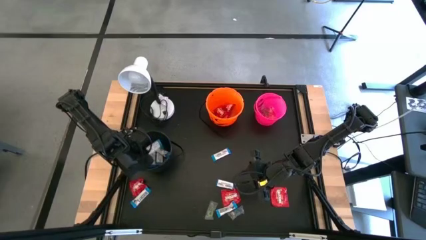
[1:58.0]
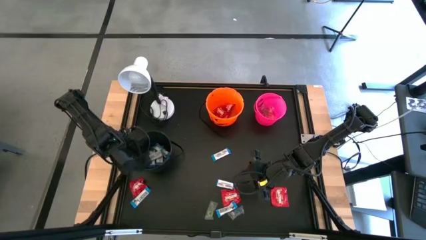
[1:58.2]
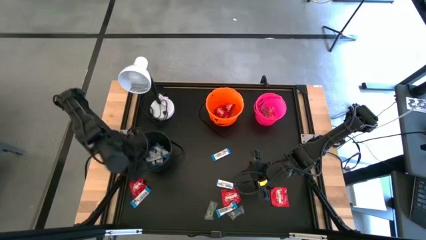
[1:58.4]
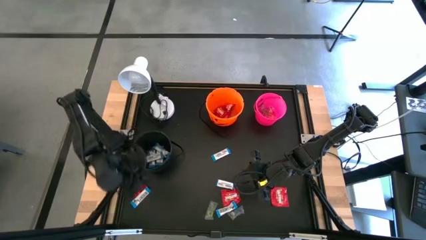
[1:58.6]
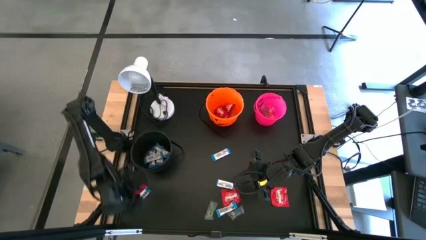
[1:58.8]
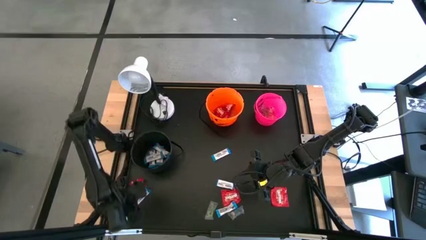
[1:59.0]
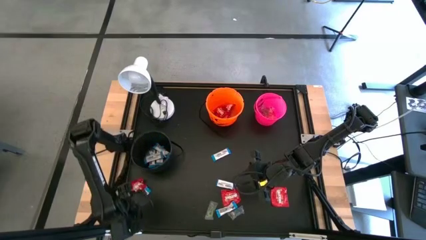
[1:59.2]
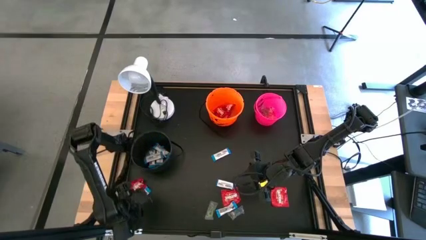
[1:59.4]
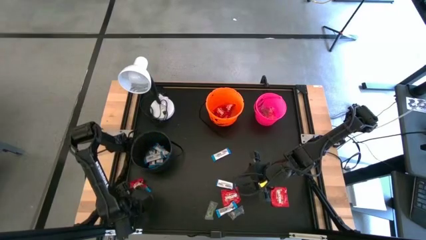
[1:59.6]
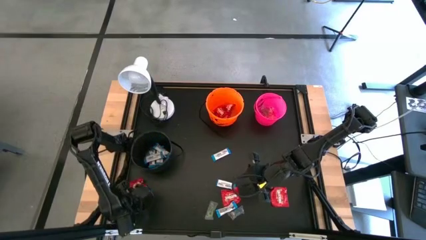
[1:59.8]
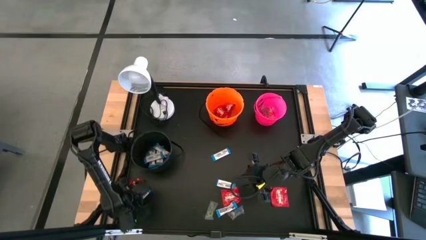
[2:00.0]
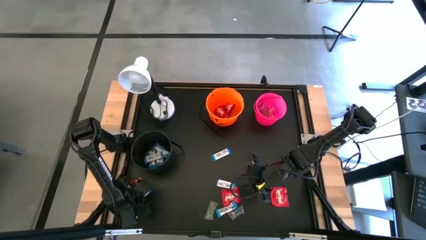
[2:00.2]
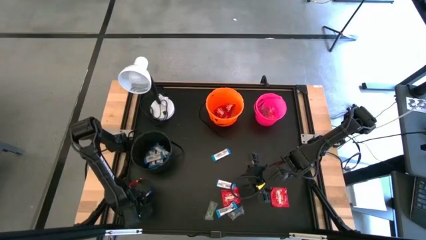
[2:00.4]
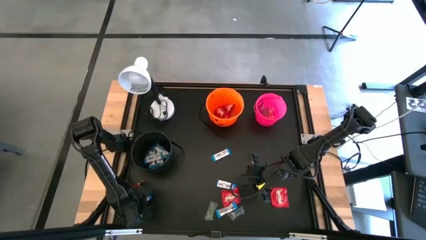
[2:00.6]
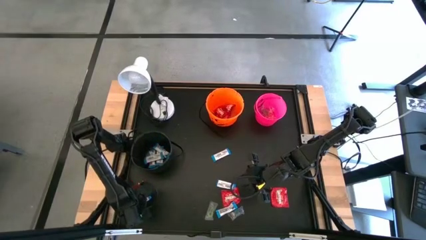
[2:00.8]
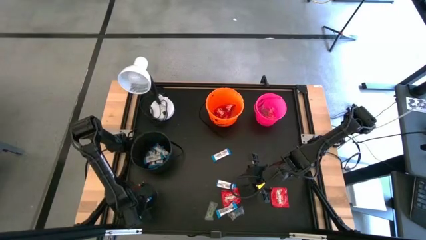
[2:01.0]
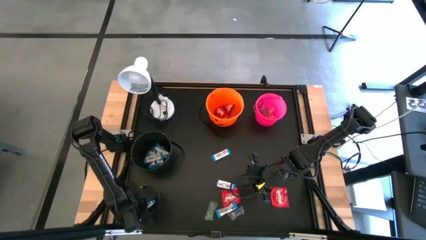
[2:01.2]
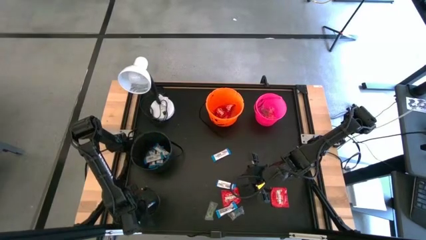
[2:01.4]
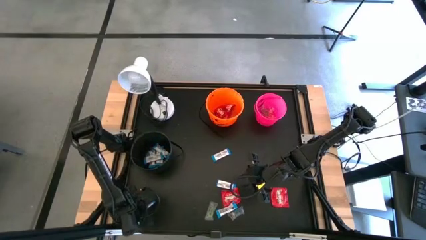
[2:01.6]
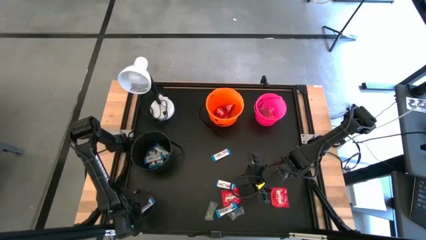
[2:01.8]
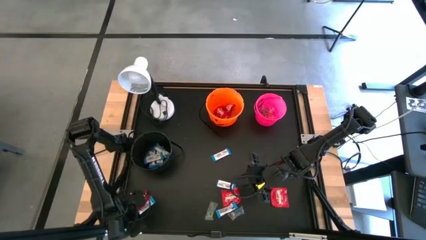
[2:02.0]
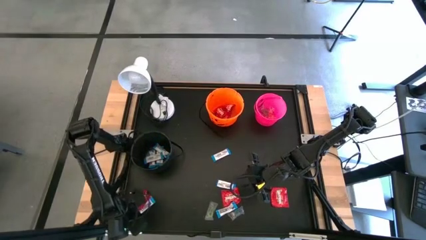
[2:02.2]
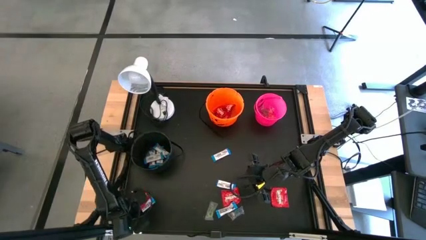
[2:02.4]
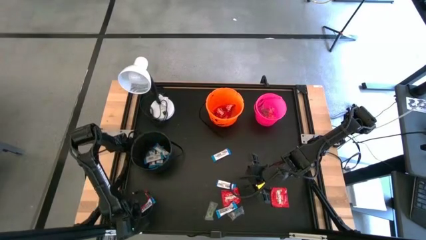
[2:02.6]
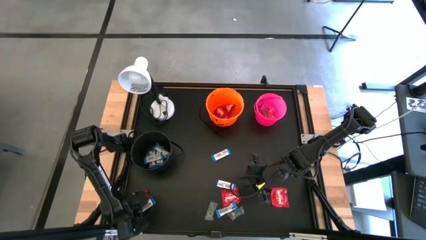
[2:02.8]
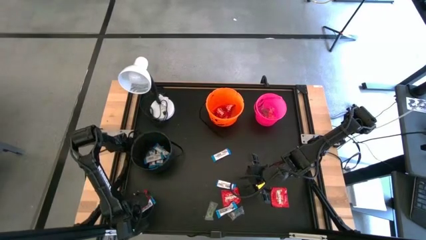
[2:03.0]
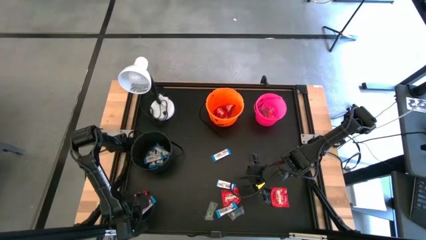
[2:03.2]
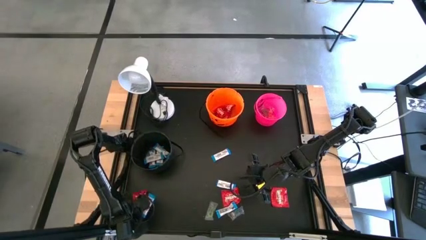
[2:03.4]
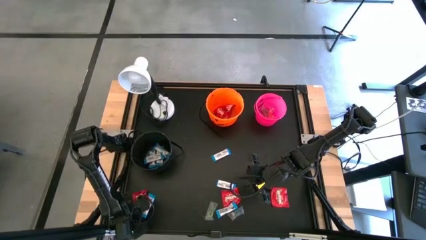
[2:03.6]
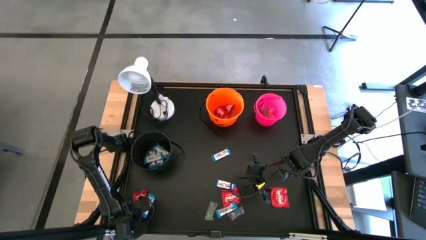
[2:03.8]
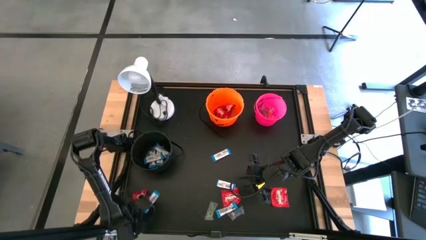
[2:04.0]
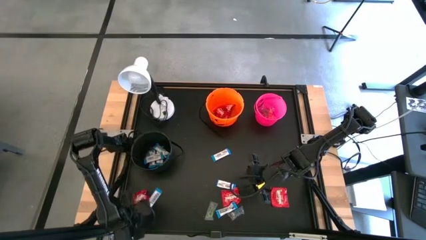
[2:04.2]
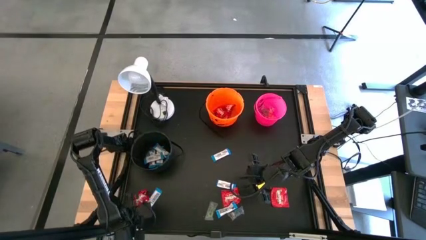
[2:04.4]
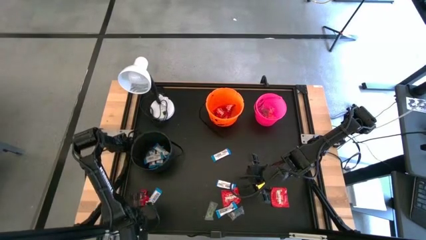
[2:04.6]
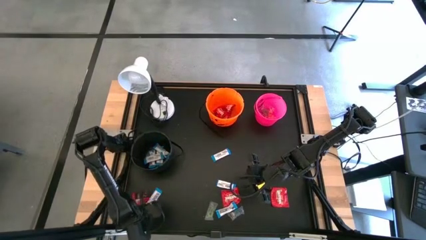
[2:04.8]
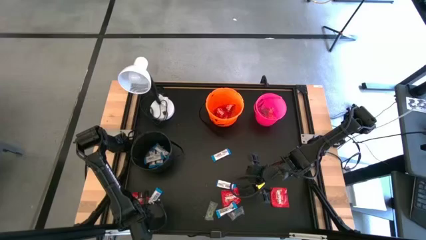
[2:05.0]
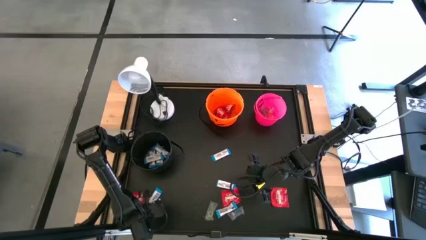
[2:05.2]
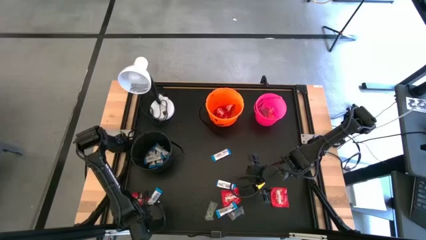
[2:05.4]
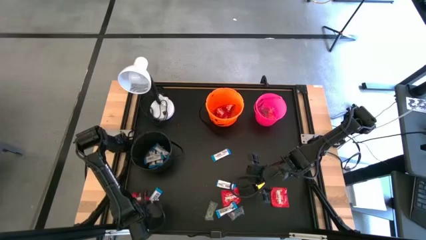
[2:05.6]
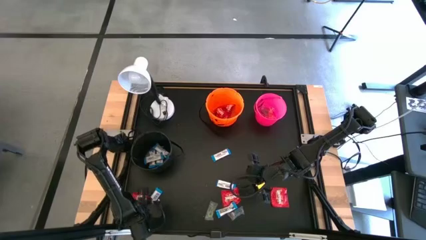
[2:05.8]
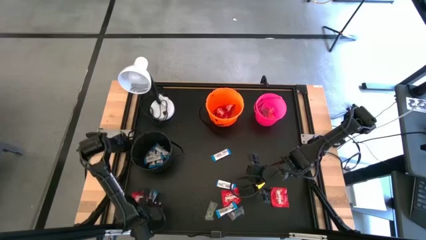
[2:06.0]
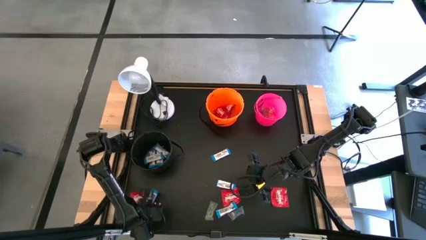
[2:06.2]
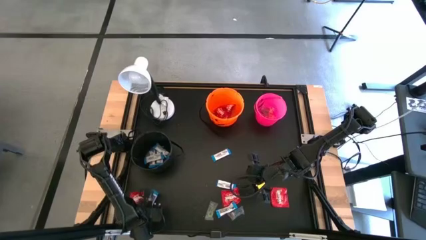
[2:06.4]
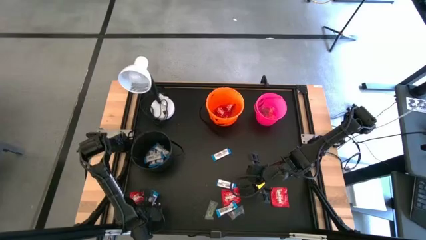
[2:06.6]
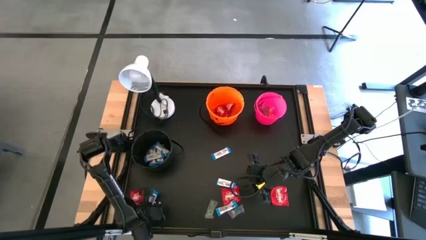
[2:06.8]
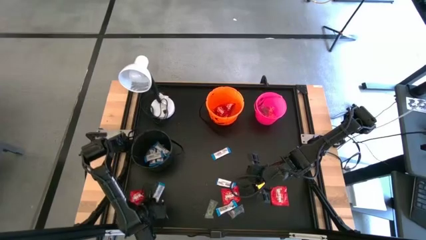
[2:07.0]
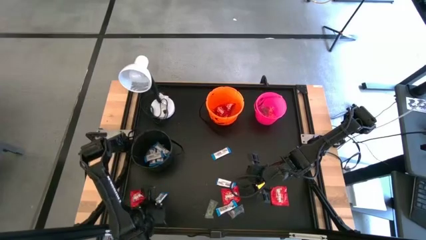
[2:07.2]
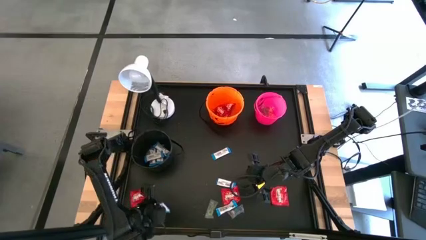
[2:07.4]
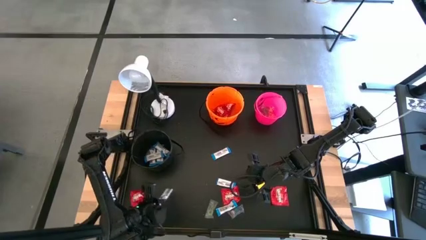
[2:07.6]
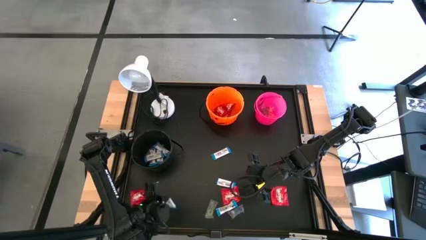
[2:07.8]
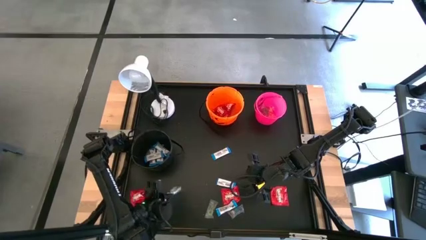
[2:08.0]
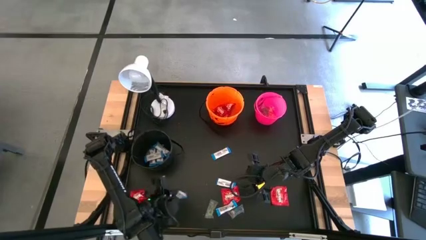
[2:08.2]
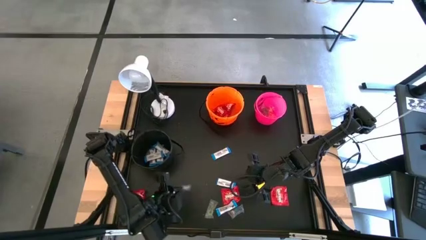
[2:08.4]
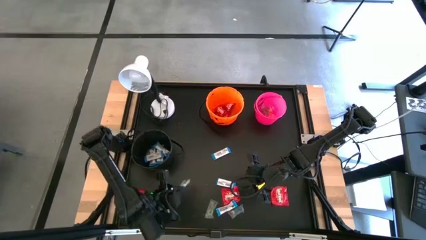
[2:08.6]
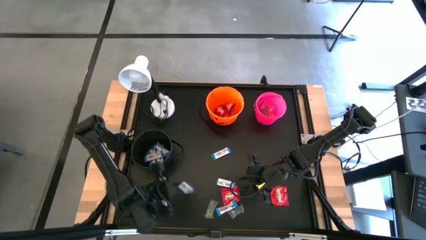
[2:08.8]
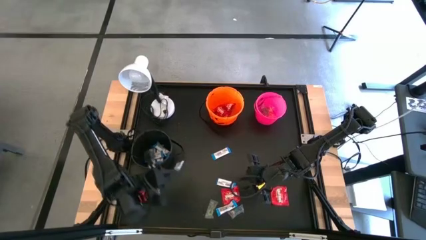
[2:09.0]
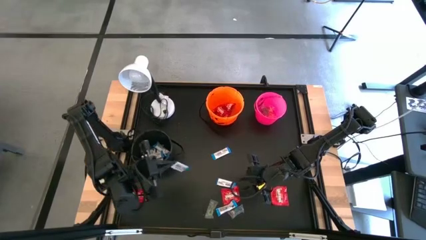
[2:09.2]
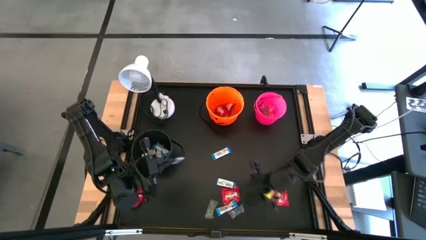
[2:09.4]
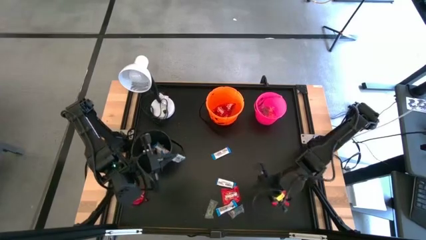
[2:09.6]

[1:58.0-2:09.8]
Task: Sort candy
Put the white candy into the black bucket

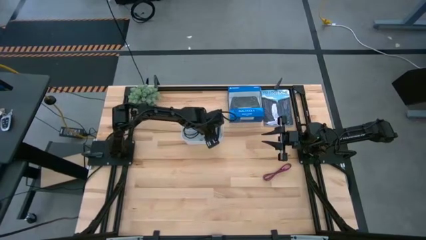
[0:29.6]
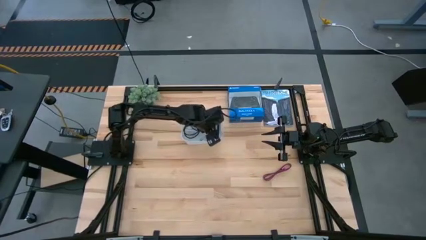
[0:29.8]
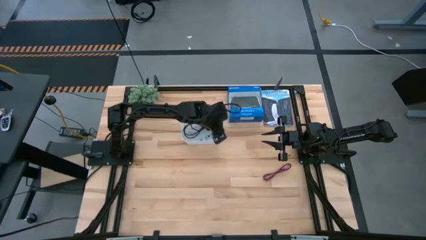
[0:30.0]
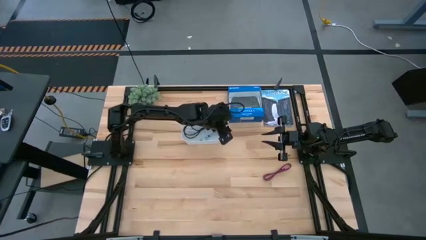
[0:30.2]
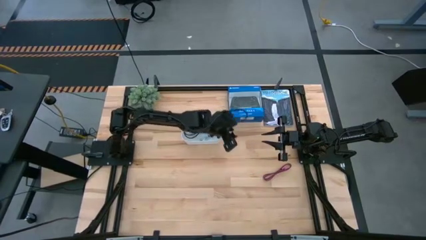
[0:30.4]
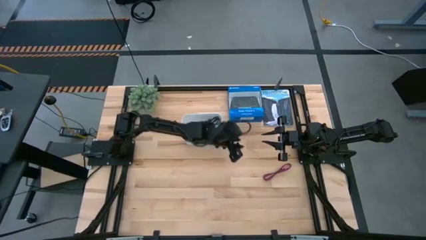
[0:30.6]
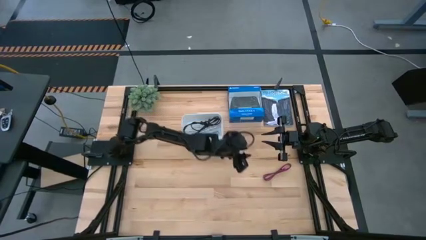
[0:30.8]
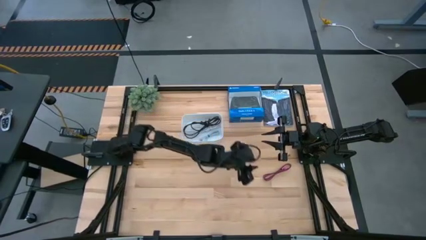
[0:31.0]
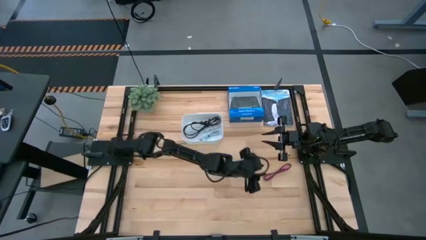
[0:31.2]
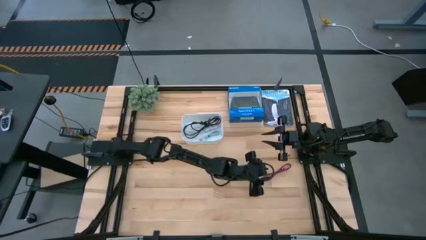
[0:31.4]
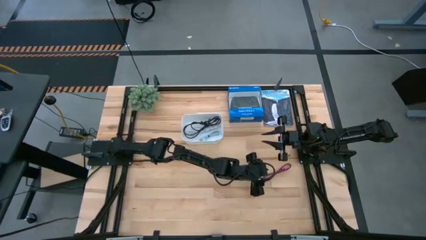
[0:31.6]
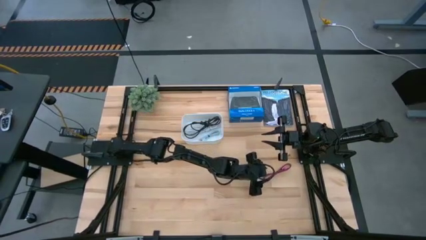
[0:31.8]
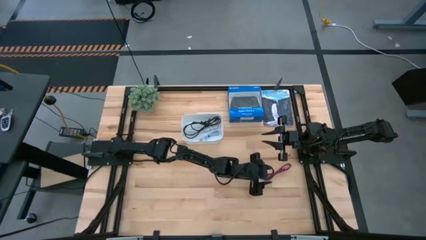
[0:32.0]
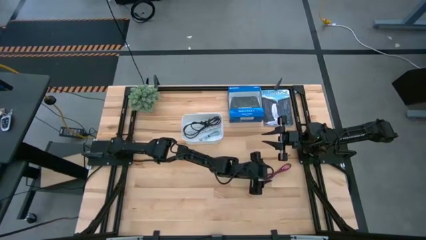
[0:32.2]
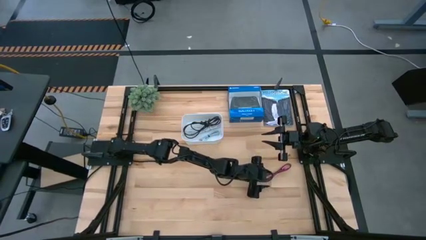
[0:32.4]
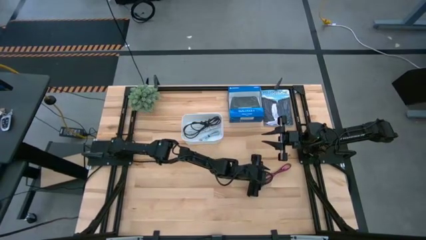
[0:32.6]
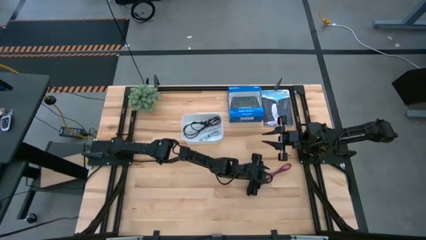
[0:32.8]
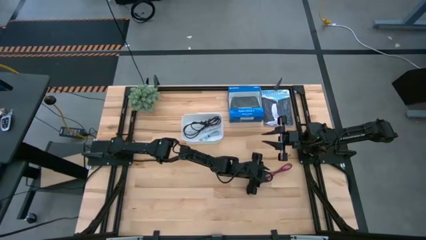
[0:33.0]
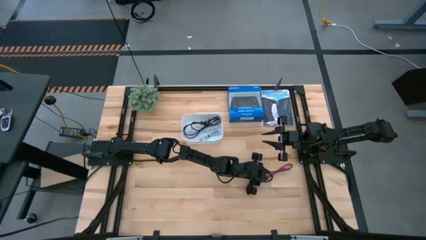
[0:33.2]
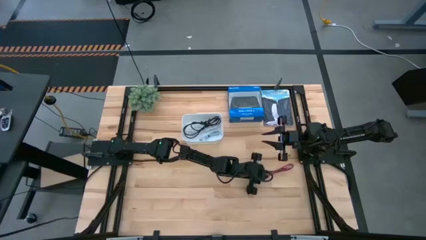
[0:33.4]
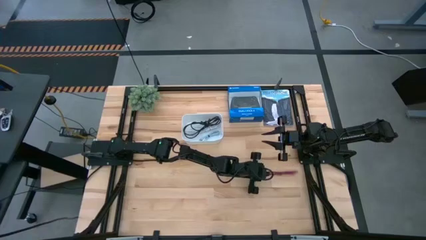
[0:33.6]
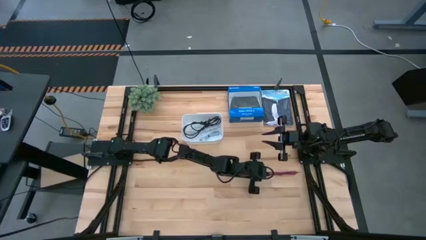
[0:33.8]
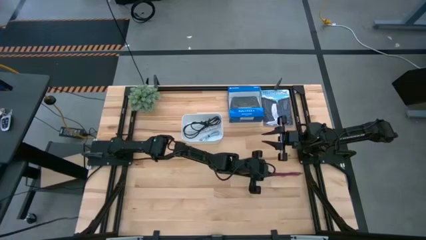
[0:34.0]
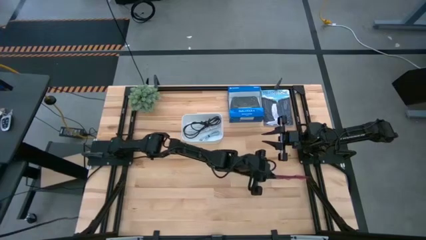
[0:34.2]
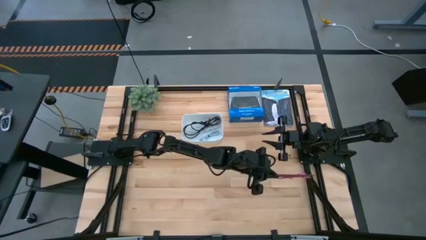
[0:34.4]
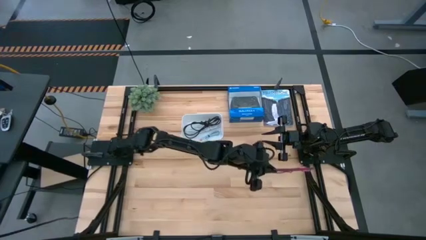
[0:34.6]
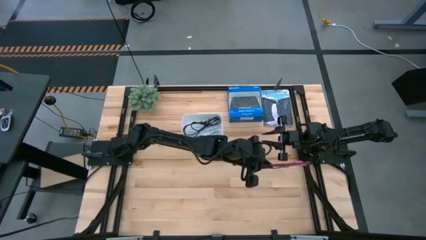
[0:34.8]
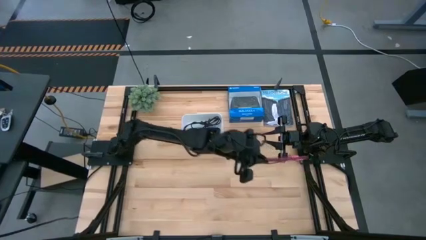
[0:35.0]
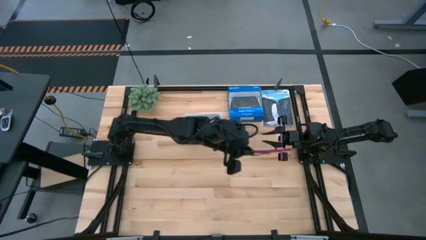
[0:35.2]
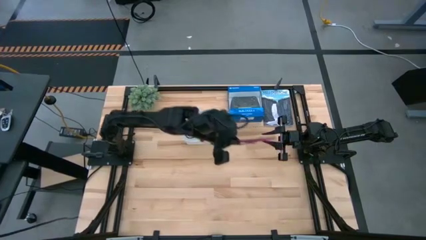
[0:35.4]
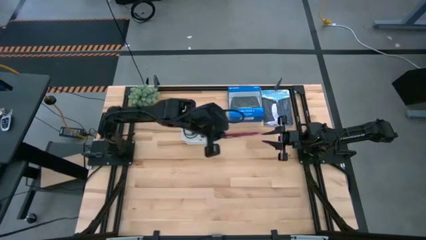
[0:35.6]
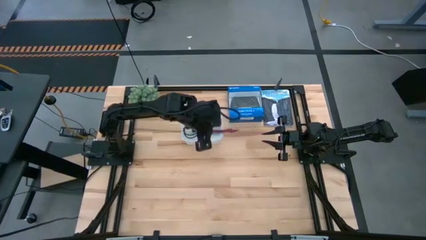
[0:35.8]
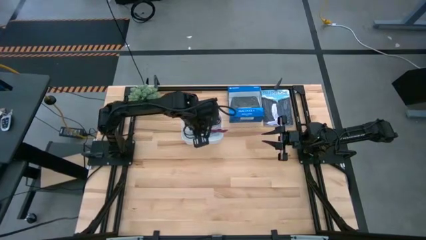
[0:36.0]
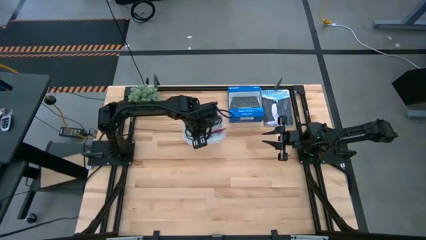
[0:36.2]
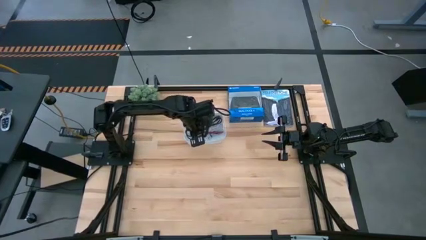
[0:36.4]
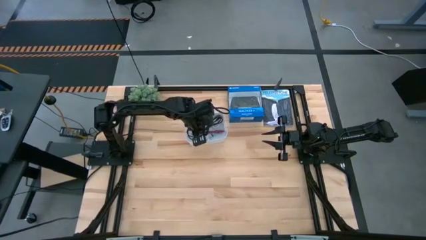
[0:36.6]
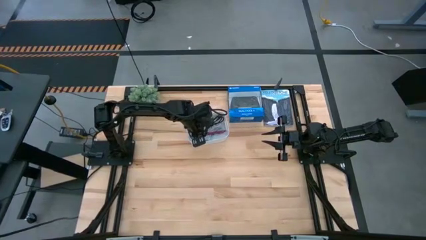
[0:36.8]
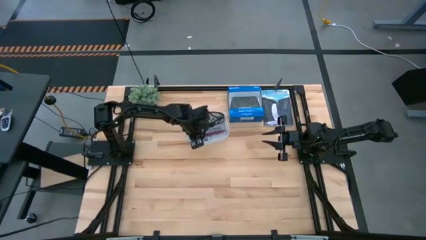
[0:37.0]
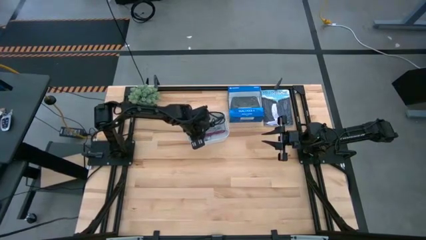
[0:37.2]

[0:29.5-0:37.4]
Task: Pick and place USB-C Cables
Put the pink charger cable into the white bin
